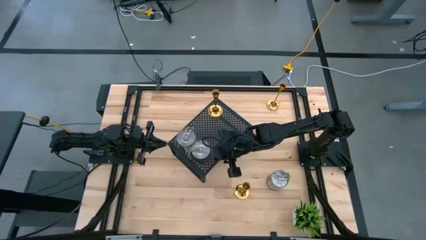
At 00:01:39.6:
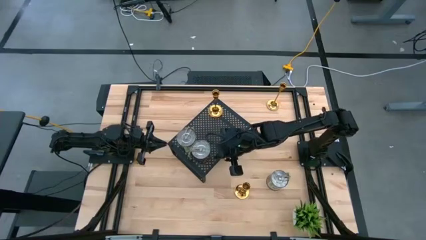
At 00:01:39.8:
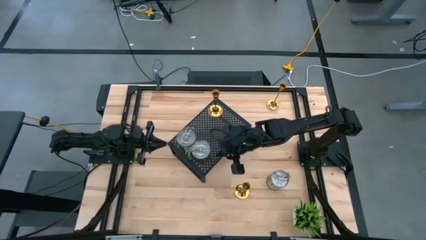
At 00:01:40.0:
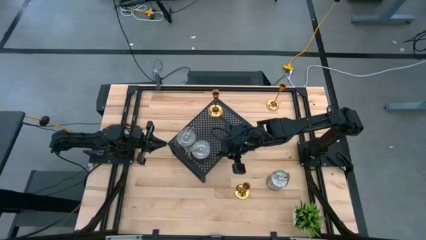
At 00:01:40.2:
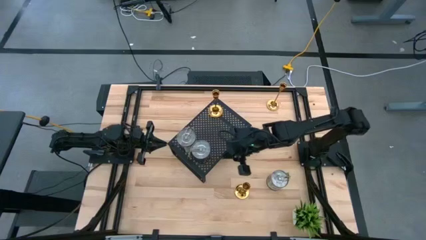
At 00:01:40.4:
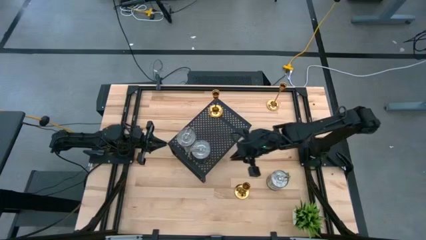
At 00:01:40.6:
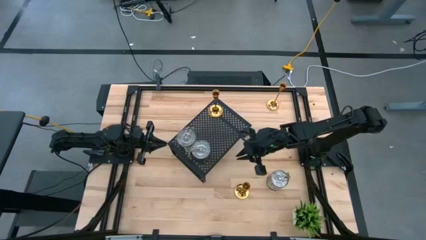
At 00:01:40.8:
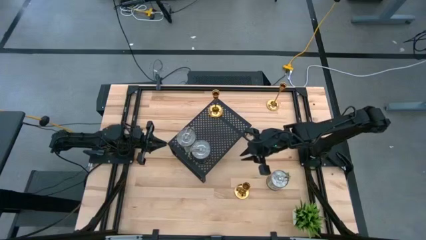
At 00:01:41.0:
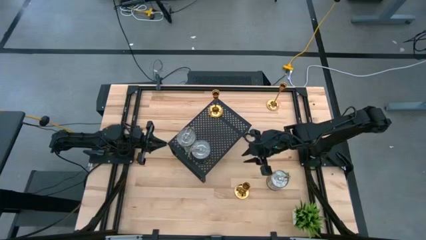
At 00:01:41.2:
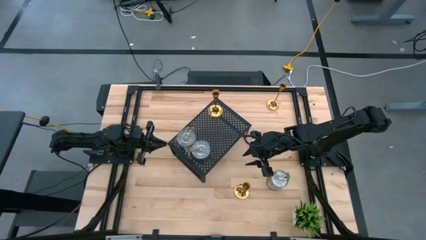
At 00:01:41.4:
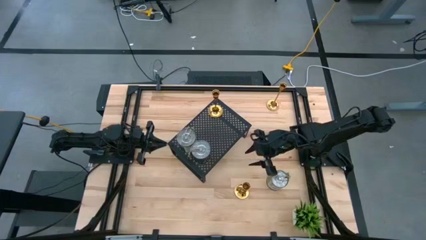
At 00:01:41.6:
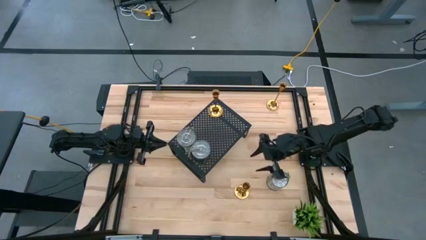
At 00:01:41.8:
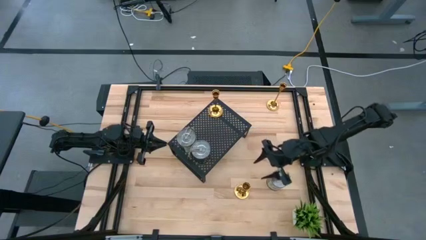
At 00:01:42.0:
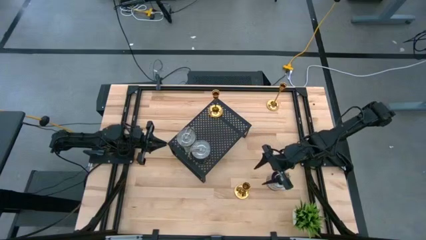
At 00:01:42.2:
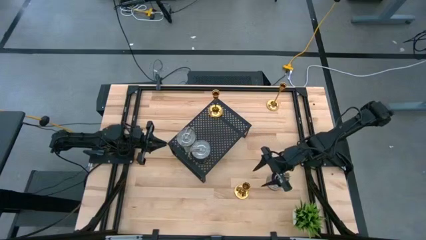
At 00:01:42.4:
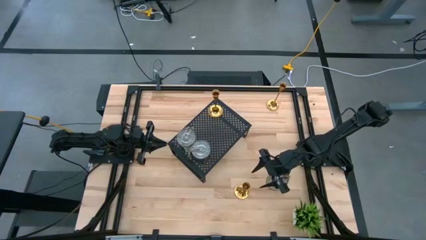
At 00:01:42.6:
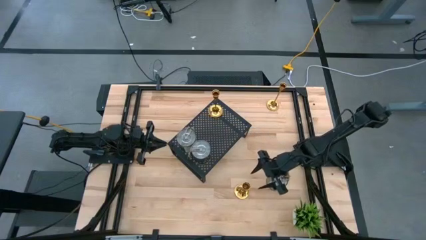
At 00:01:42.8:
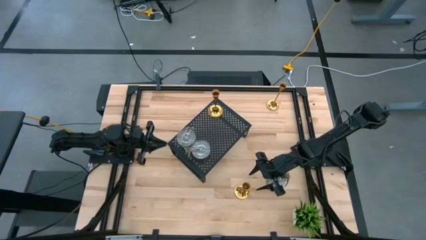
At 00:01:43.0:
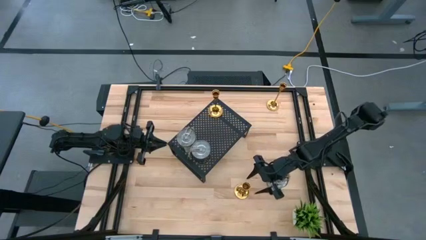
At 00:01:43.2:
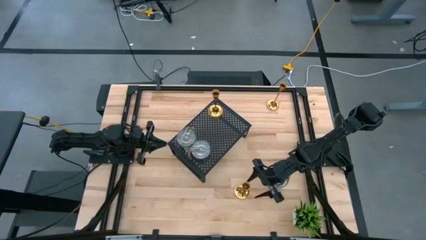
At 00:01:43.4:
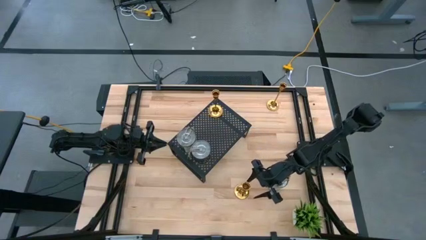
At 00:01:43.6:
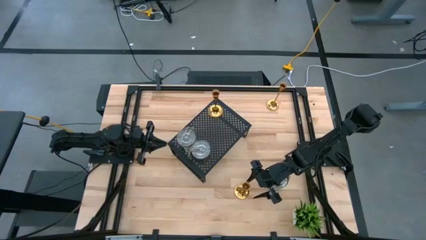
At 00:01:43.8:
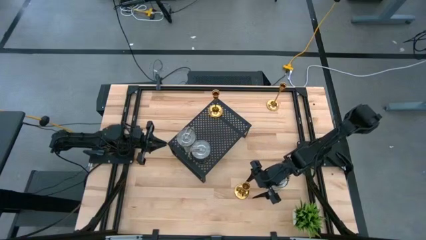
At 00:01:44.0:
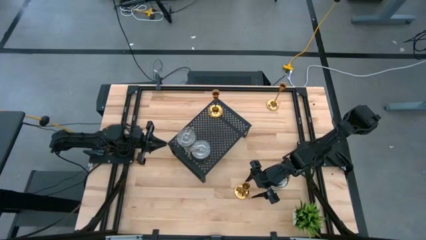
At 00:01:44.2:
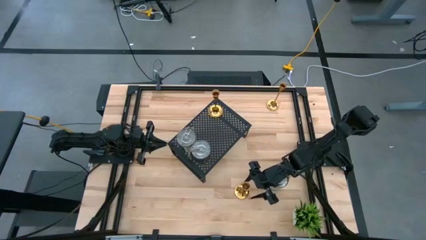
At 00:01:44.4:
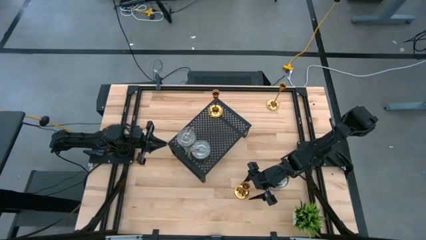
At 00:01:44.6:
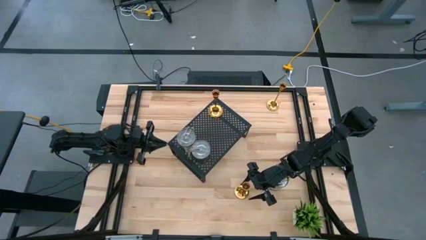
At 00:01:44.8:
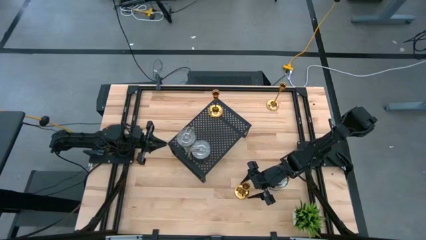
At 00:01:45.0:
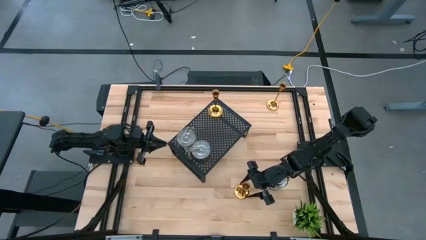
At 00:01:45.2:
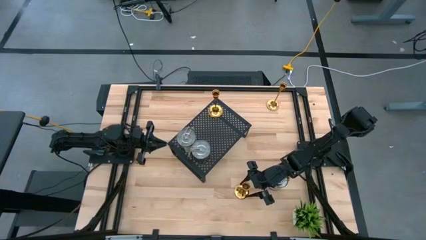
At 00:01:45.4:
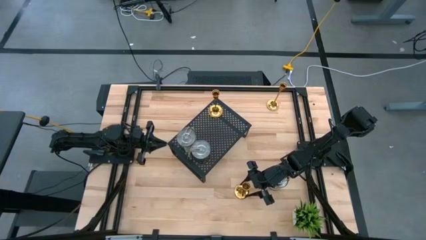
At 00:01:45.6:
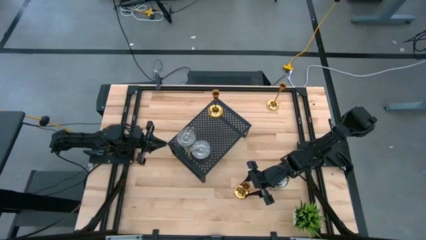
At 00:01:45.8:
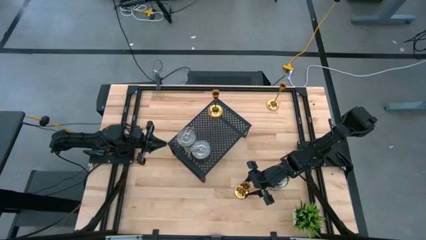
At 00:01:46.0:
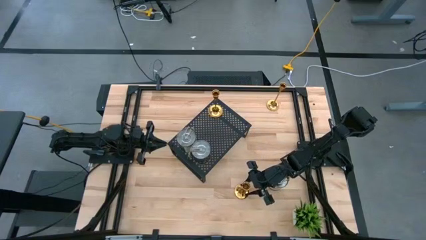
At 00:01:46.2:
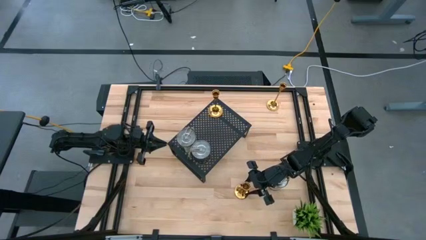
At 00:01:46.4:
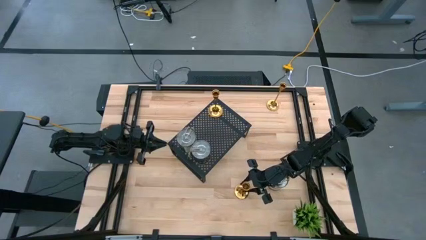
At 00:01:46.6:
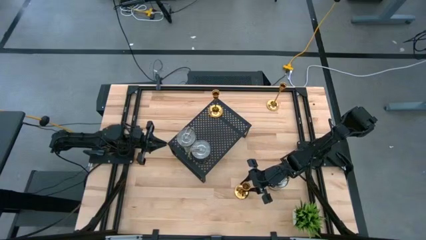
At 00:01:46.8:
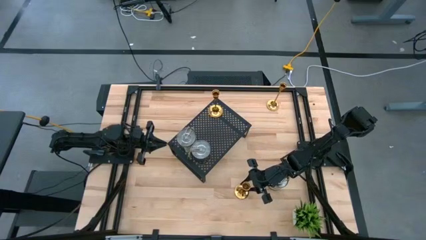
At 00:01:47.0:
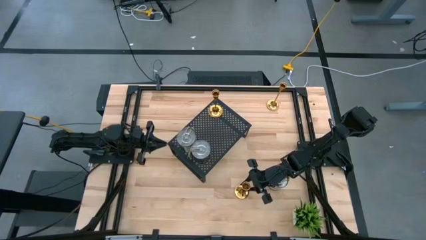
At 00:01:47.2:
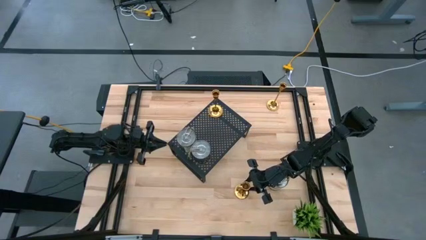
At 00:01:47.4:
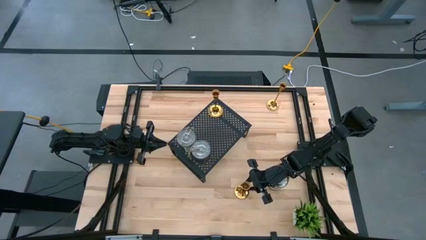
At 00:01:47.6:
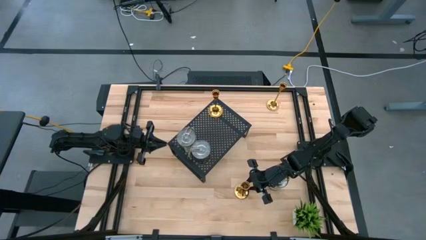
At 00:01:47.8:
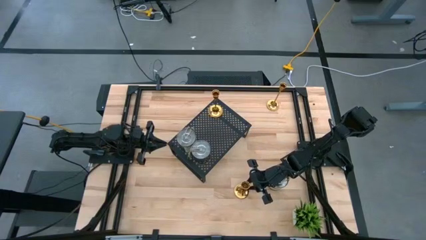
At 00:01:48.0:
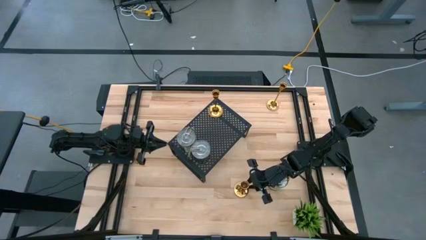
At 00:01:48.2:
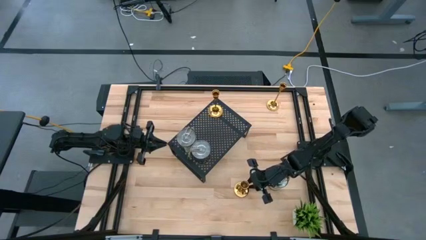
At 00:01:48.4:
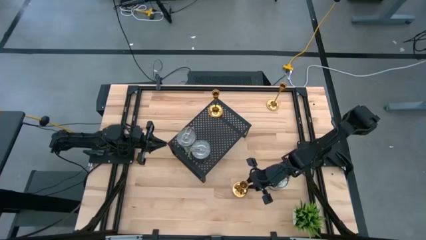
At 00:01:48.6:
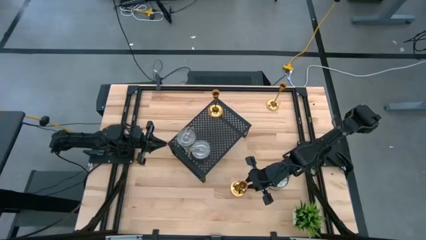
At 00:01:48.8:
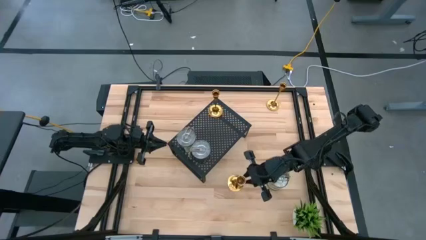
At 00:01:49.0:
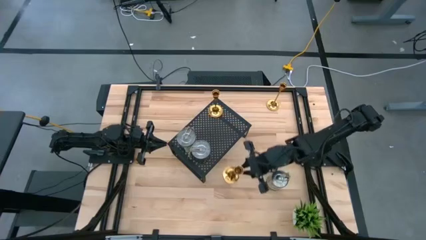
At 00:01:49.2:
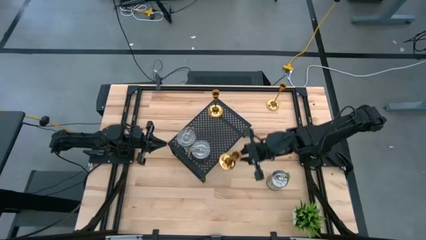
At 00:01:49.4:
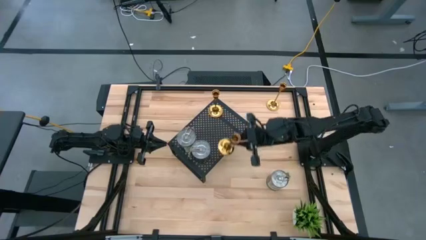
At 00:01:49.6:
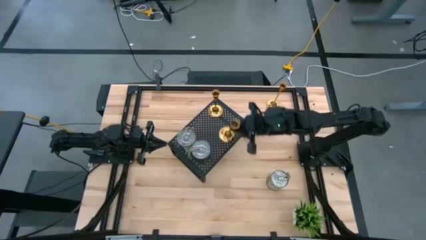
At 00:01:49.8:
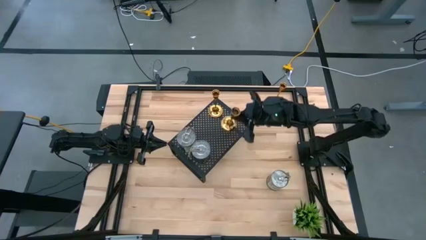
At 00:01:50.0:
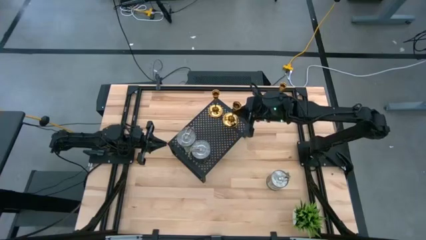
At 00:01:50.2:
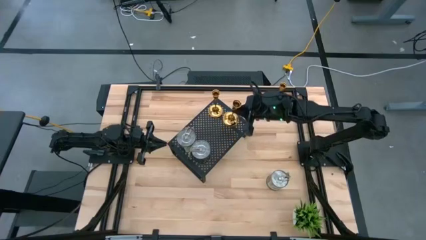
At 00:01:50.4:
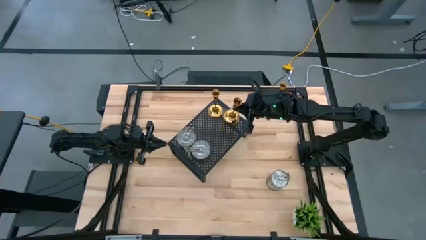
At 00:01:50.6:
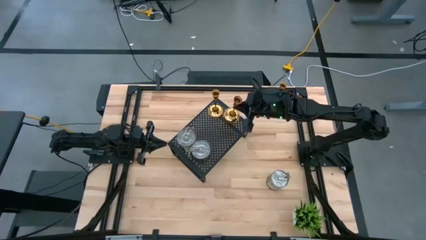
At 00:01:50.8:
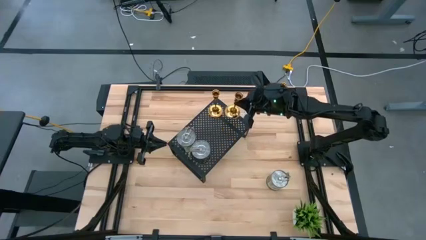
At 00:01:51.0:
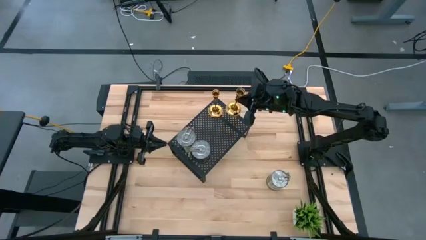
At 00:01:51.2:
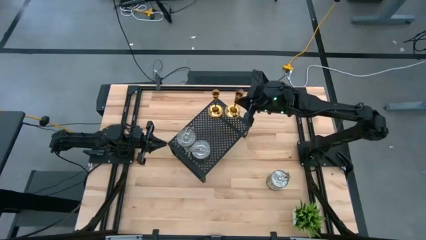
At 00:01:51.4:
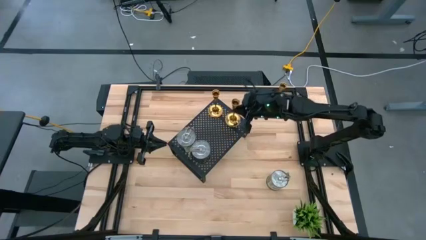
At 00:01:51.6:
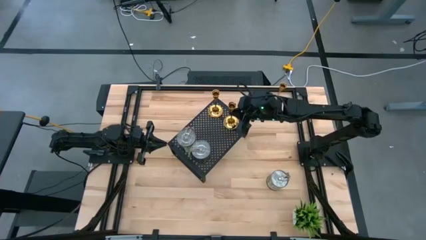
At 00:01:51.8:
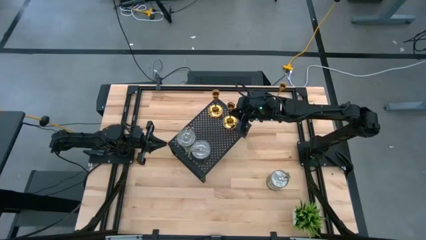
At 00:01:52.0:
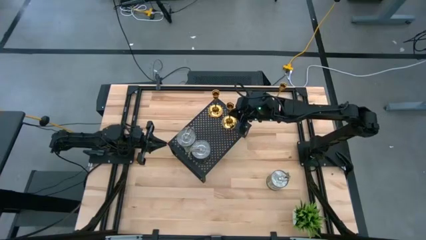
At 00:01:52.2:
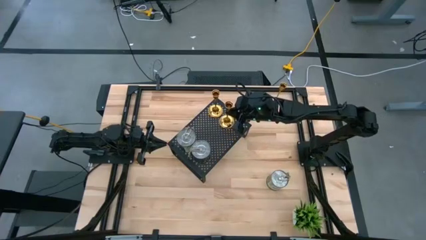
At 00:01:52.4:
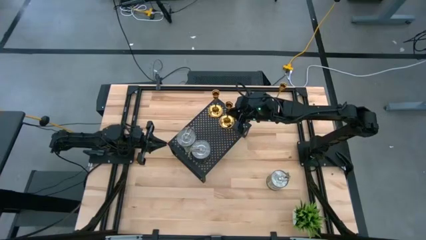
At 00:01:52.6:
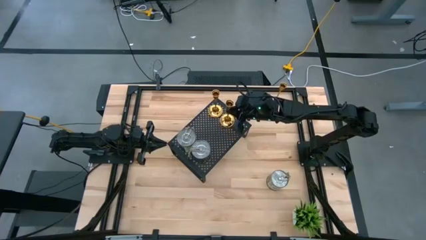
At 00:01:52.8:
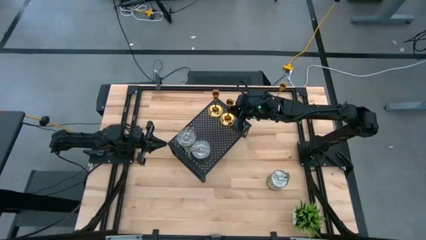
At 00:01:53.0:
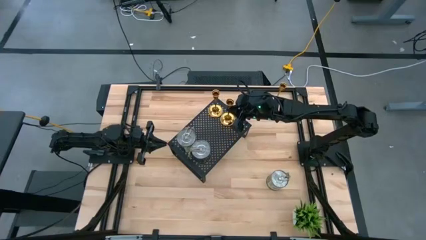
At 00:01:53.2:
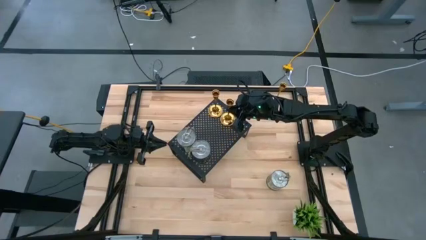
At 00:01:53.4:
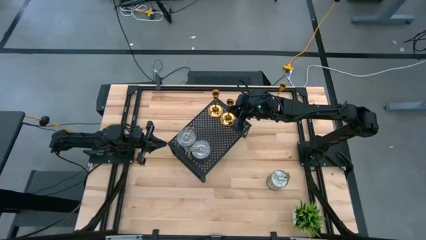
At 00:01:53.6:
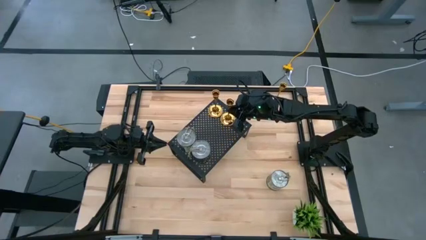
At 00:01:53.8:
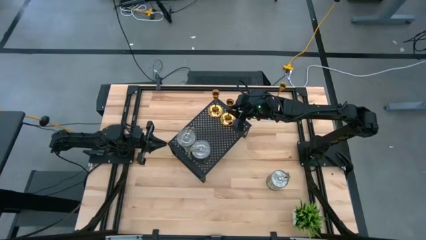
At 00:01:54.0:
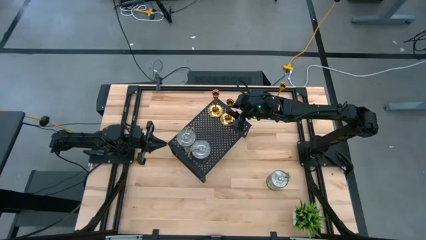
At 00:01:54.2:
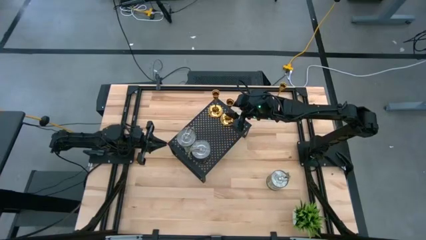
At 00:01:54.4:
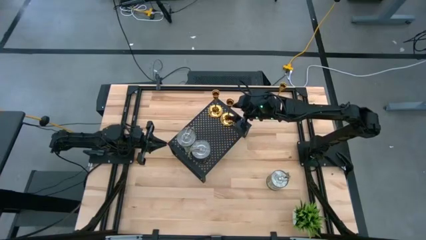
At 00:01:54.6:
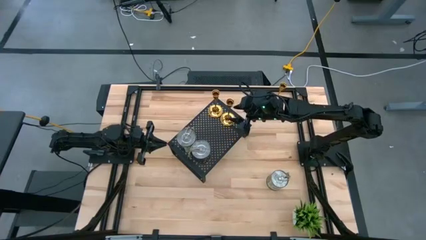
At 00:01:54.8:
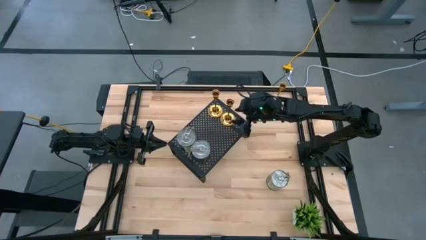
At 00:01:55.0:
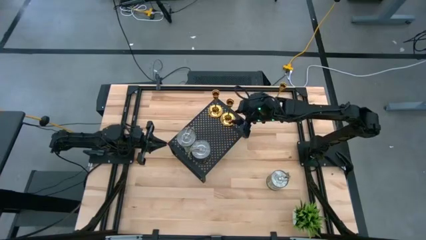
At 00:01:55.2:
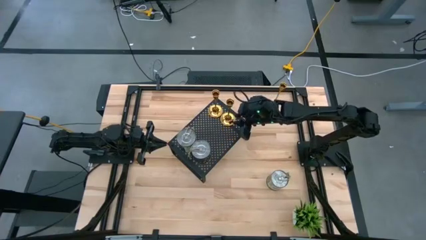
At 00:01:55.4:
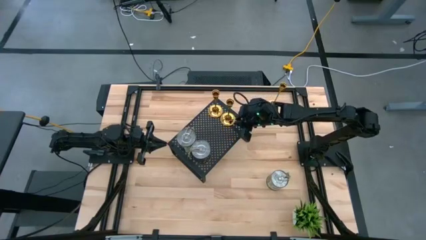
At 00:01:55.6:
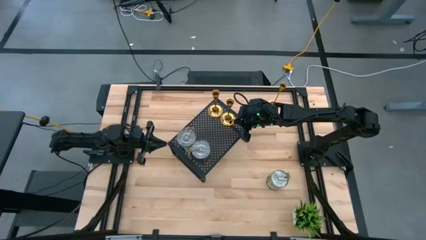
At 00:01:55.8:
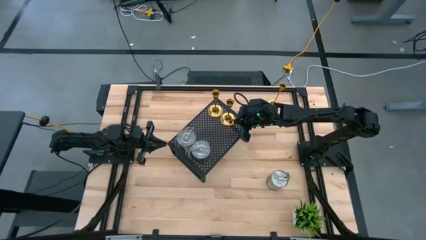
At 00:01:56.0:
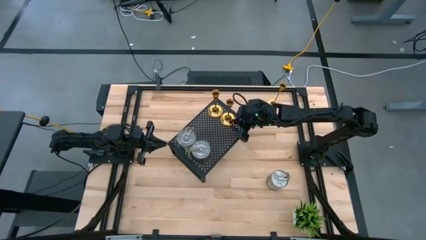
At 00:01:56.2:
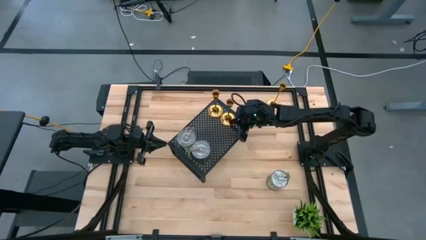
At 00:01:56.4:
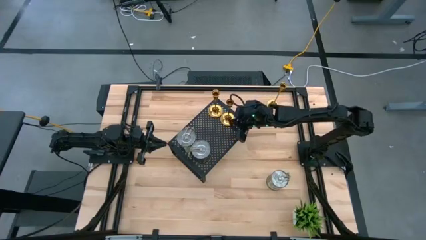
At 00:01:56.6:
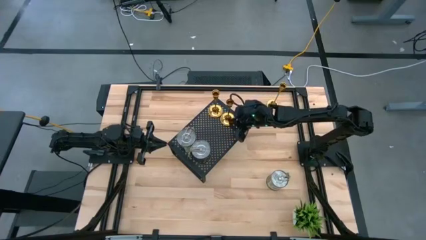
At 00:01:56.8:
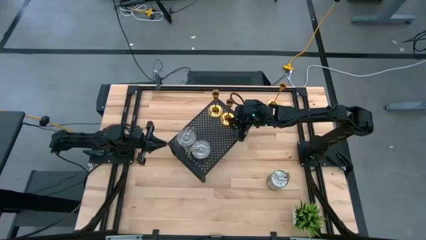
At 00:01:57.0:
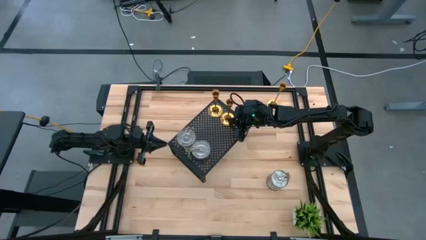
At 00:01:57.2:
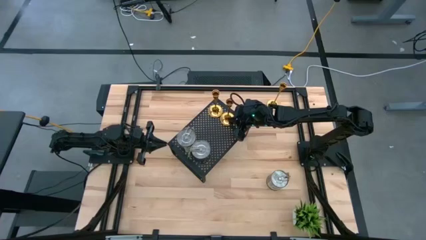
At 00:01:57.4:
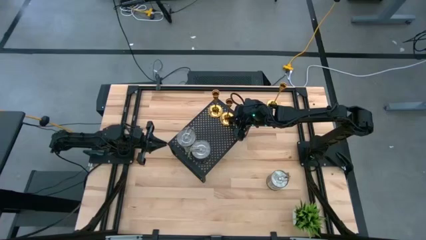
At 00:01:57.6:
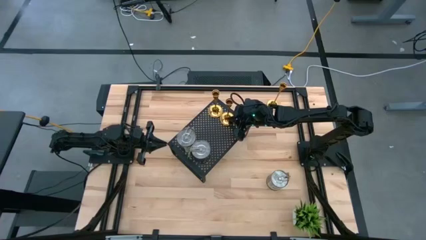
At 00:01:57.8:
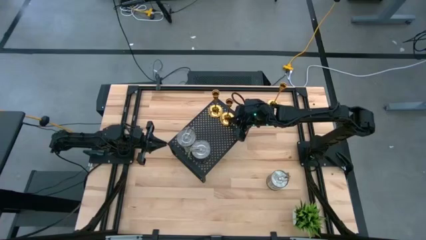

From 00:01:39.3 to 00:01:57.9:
Task: Pick & Place candle stick holders
Put the bottom gold candle holder on the shelf aligned with the other gold candle holder
